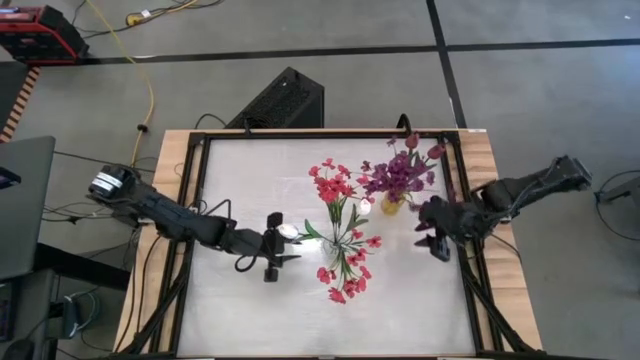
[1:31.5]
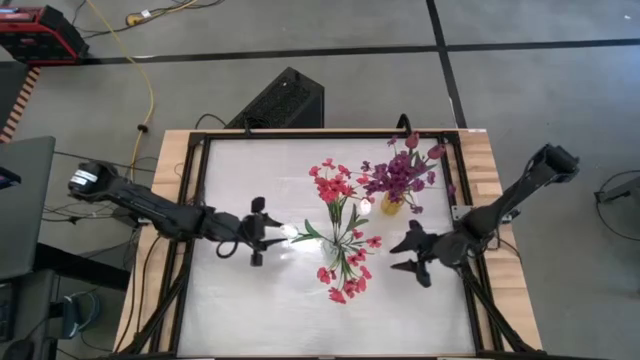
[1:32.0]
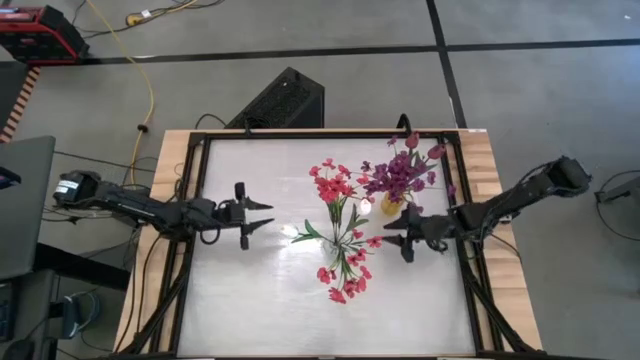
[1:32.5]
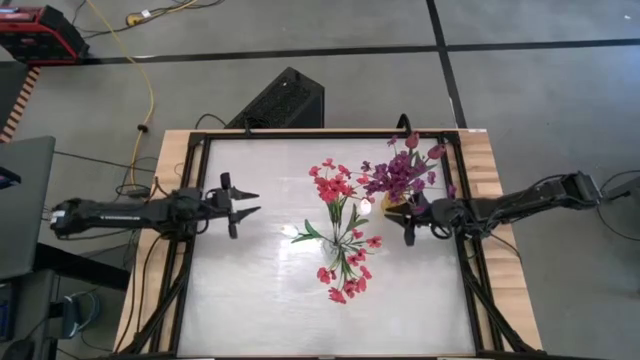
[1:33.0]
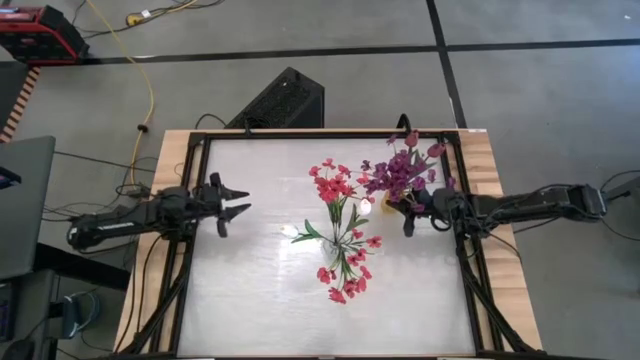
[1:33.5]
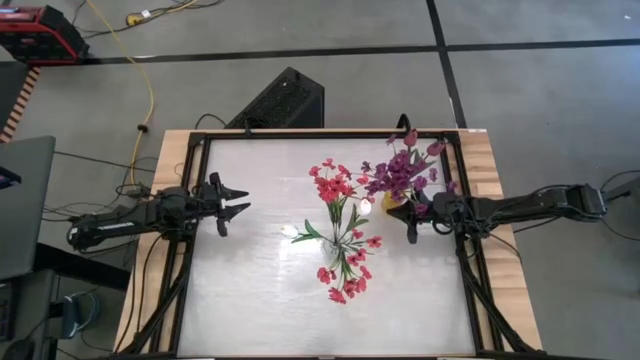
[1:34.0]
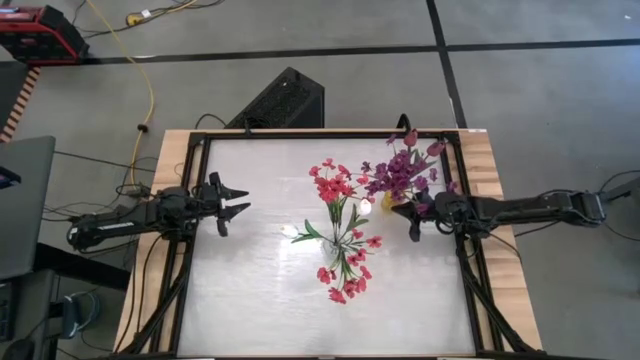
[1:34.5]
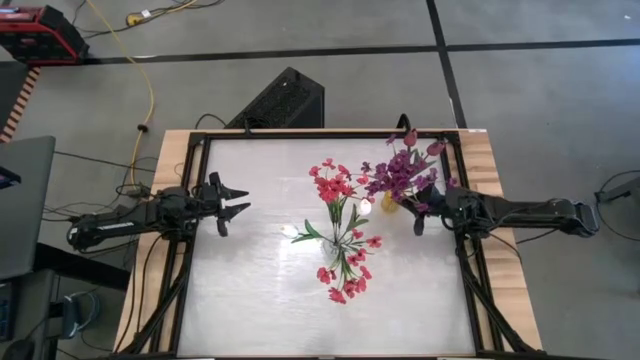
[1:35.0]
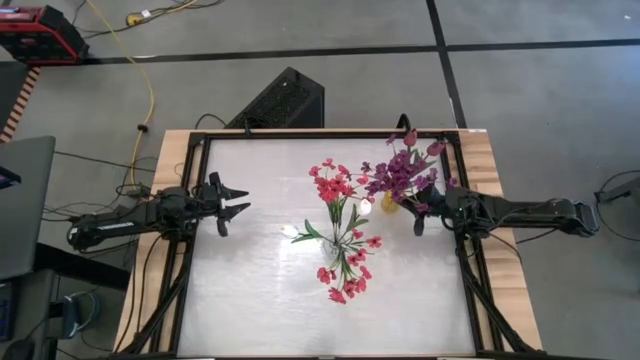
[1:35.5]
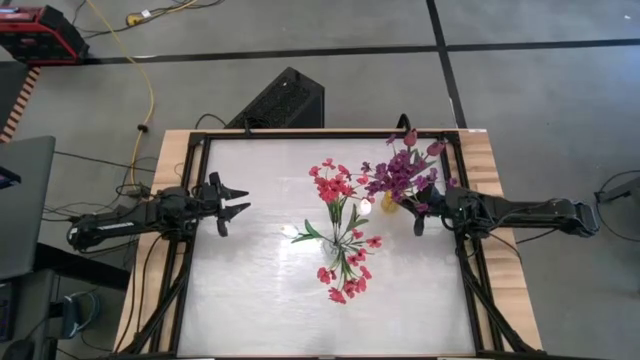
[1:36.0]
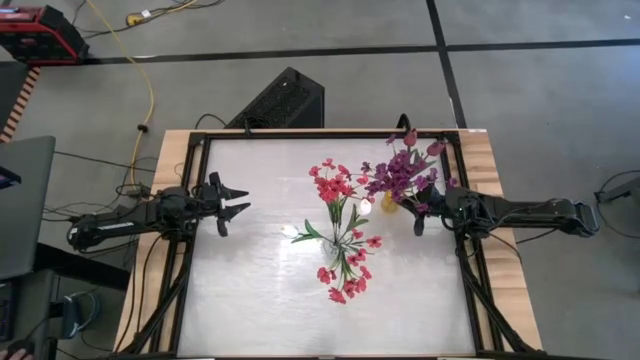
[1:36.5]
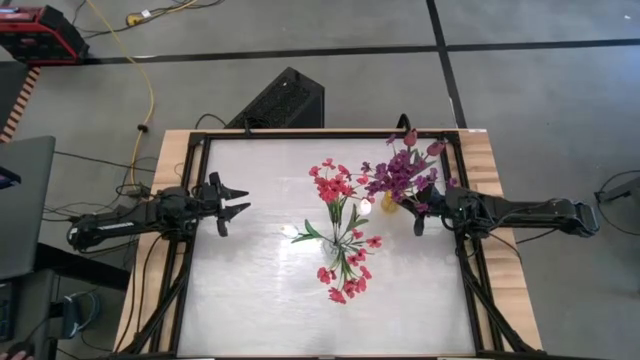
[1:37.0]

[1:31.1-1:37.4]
Task: Sort flowers into vase by color
Return to Home Position

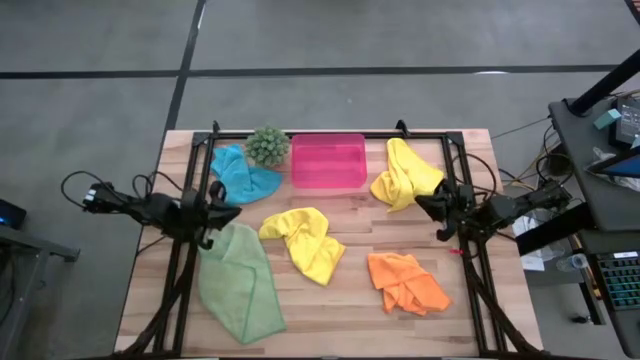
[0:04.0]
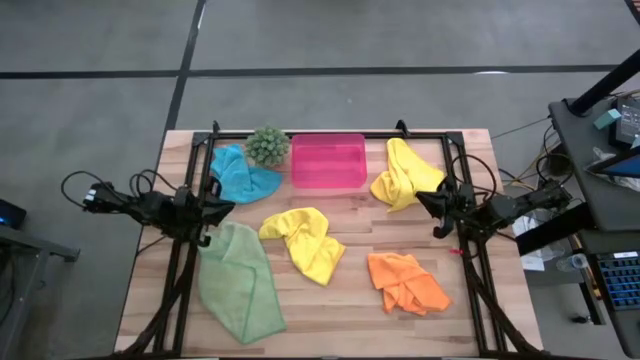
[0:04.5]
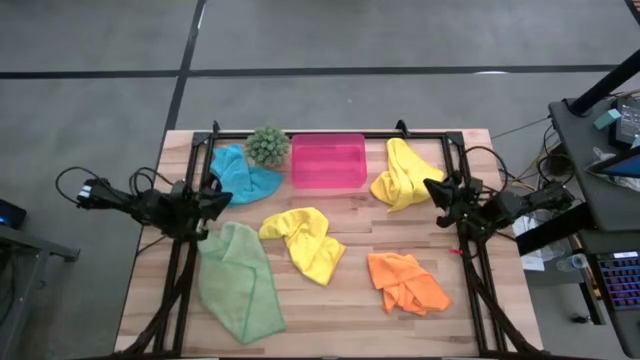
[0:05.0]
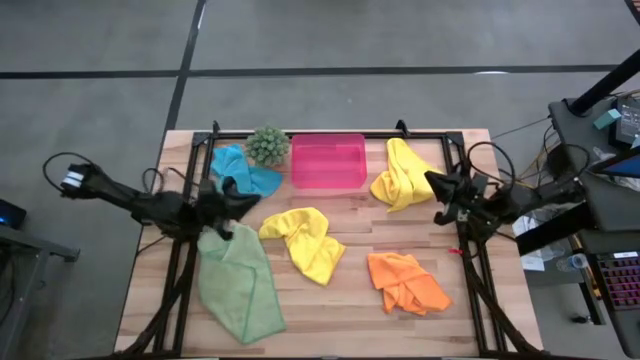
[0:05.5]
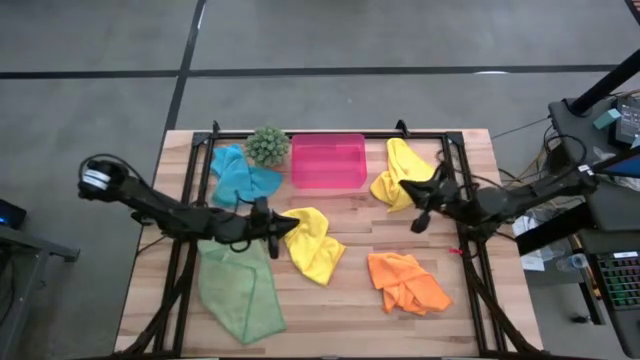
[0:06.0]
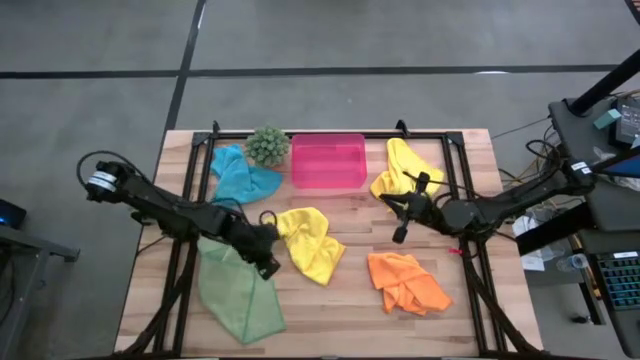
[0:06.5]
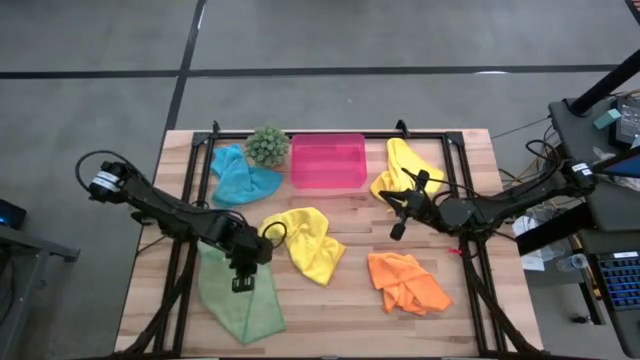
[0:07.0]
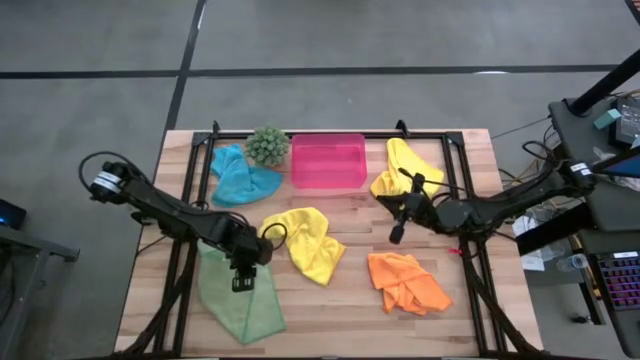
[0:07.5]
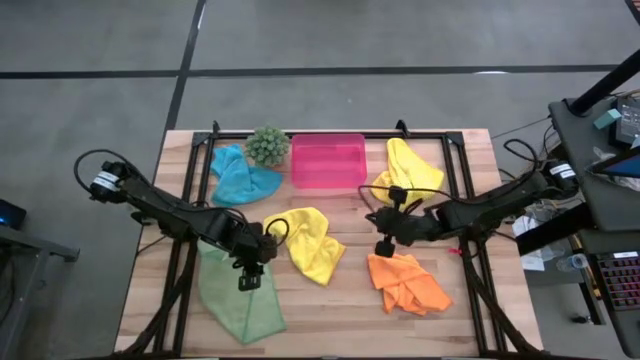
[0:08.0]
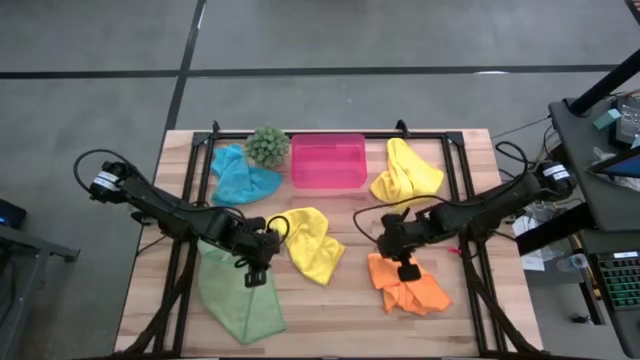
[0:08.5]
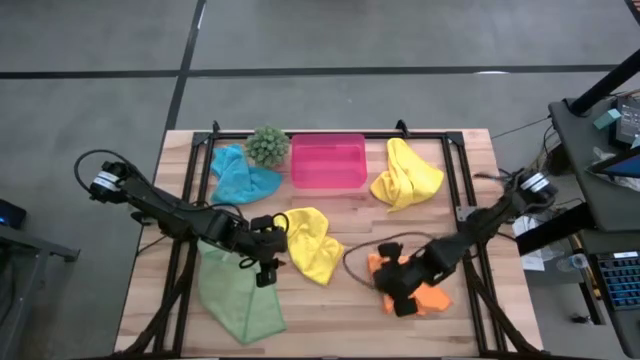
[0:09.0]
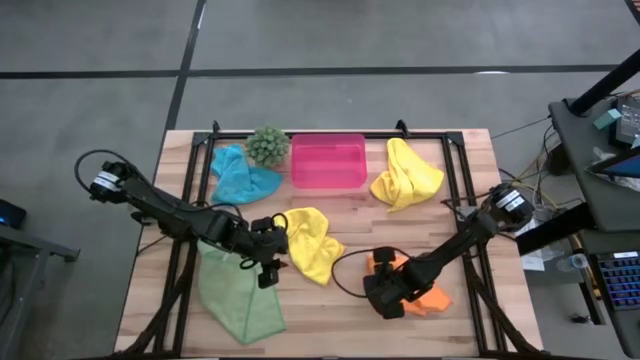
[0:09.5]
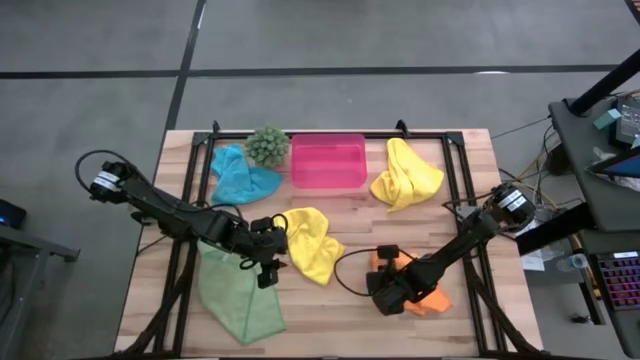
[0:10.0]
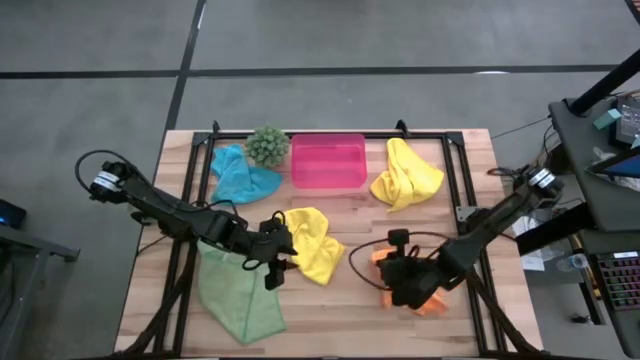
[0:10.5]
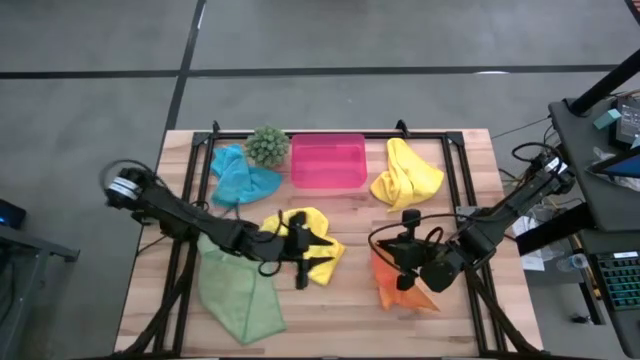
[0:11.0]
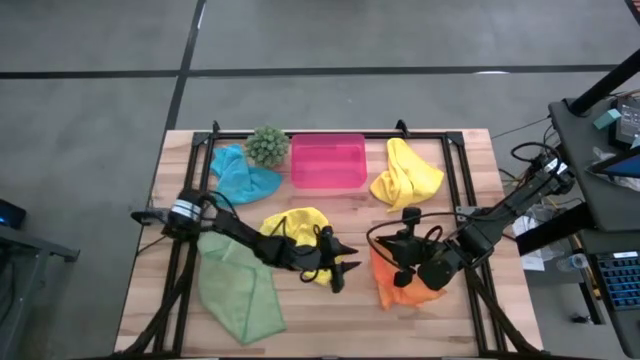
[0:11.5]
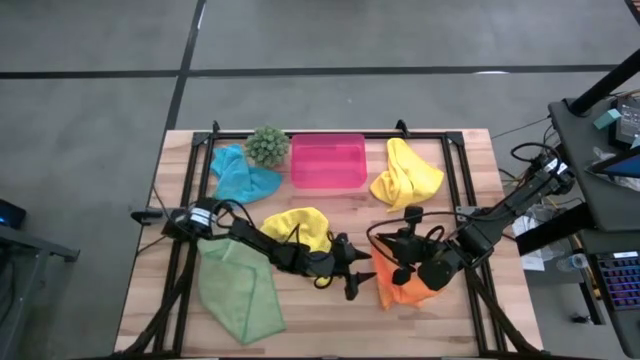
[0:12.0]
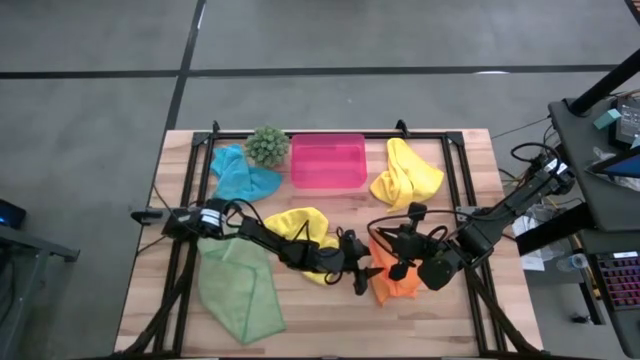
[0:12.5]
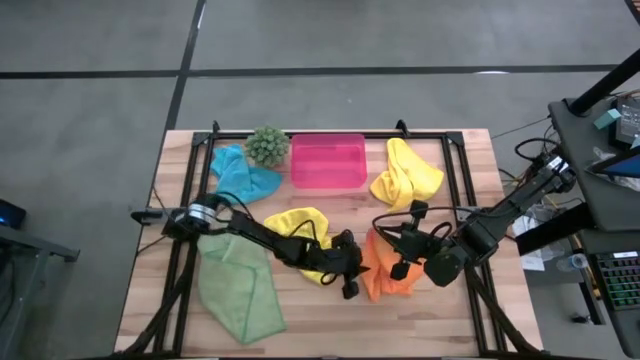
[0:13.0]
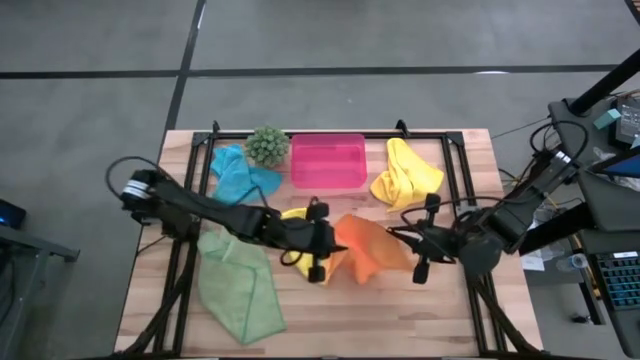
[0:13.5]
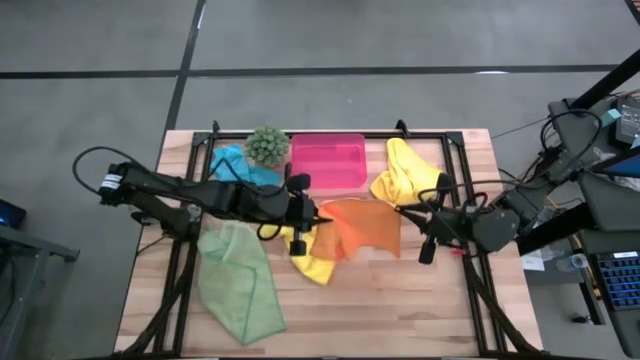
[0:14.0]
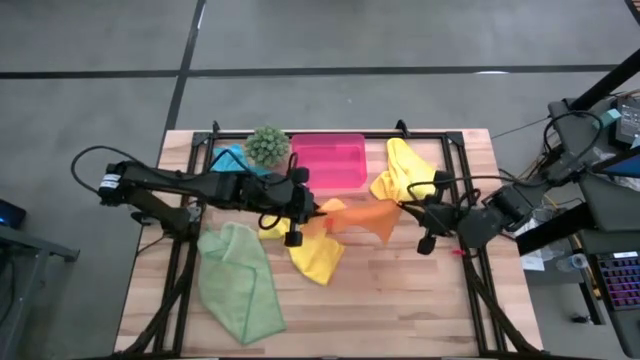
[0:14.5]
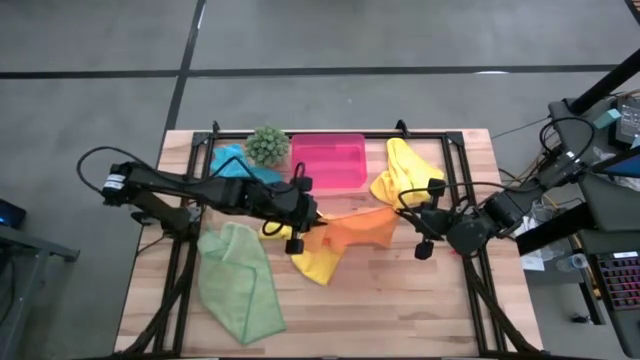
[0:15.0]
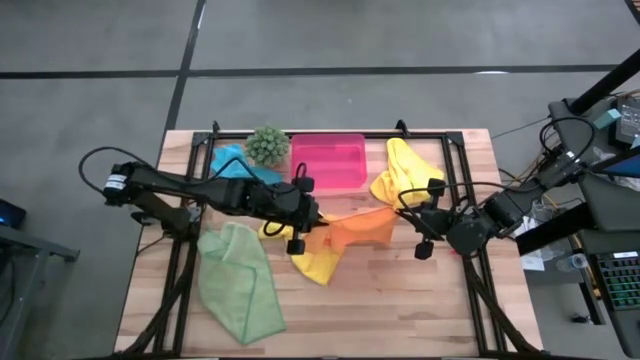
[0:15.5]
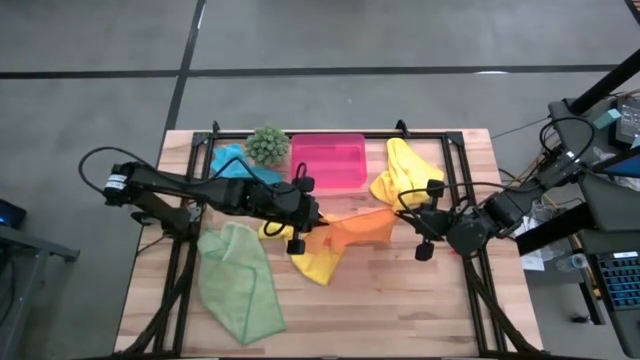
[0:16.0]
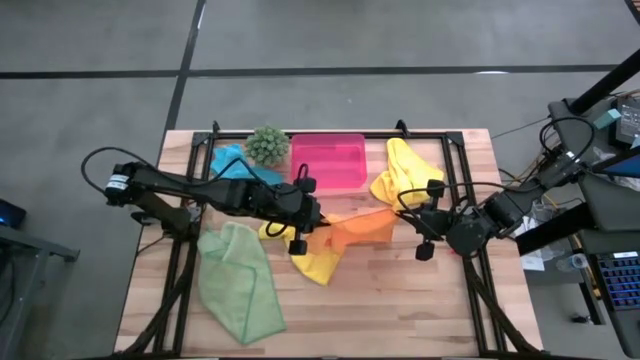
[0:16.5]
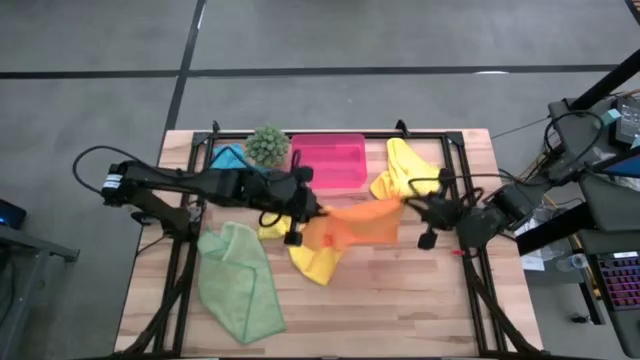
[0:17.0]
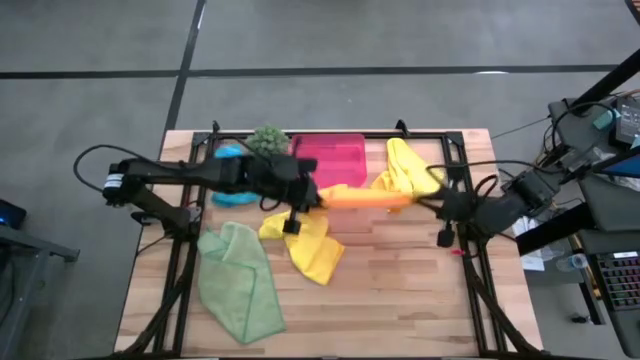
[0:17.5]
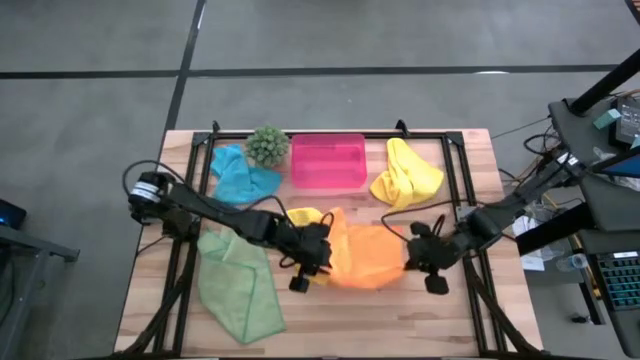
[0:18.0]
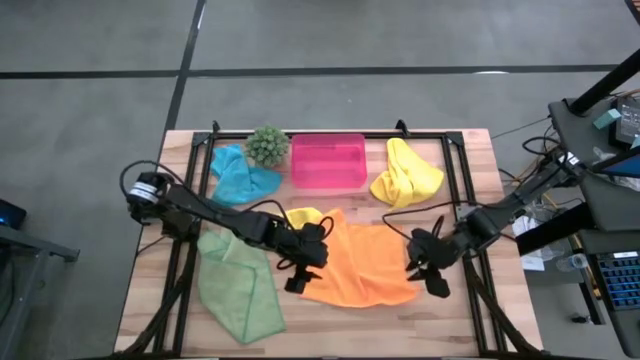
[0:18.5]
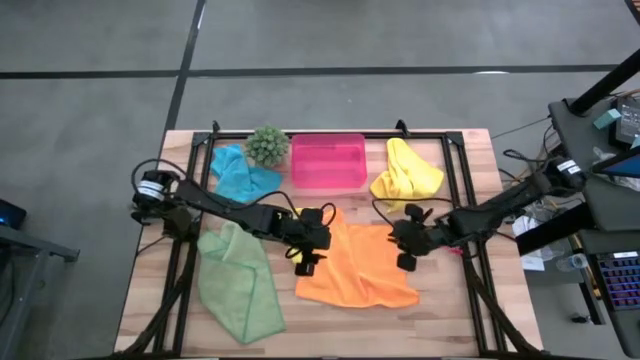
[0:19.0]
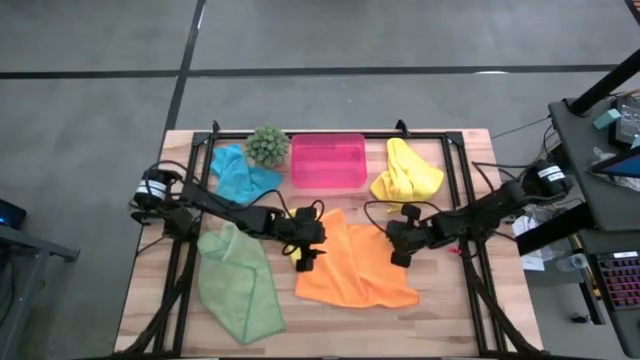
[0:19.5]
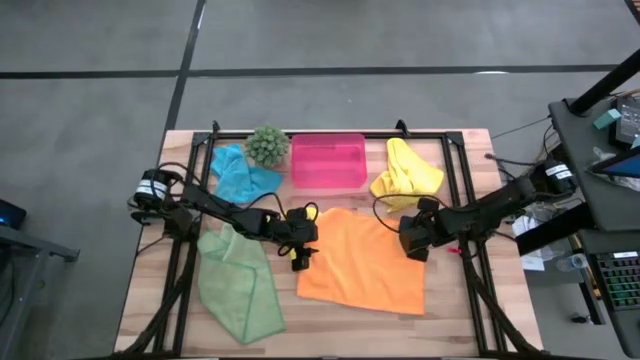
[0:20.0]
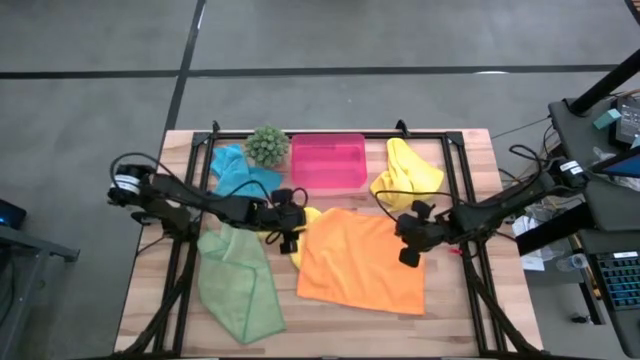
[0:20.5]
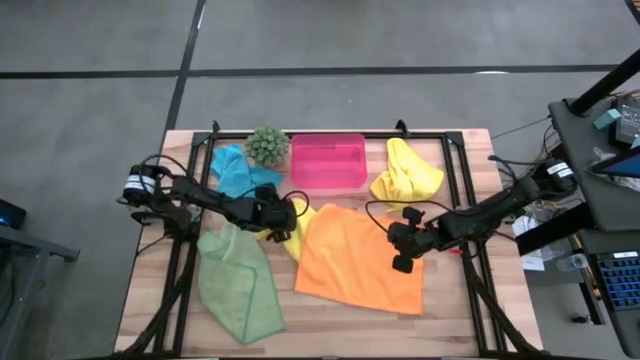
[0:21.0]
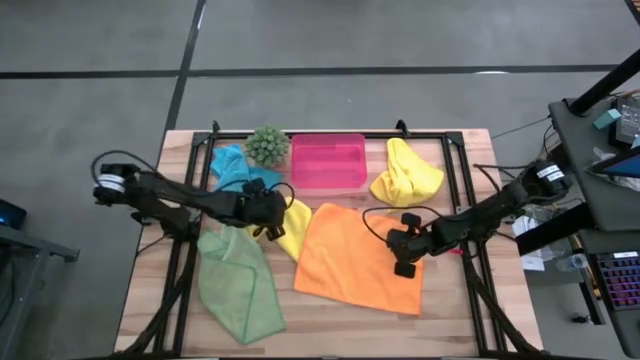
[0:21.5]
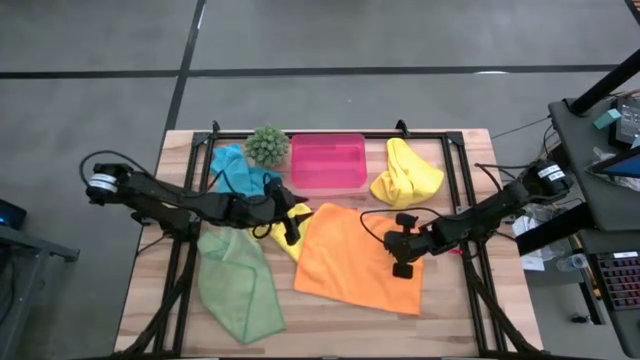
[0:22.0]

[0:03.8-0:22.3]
Task: Fold microfiber towels
Fold the orange microfiber towel
